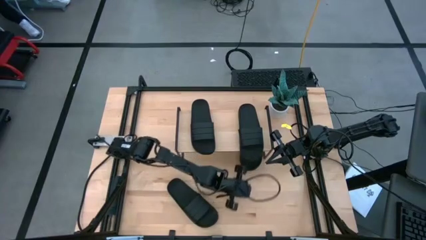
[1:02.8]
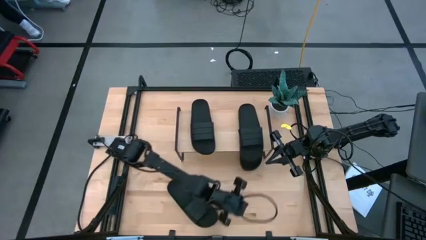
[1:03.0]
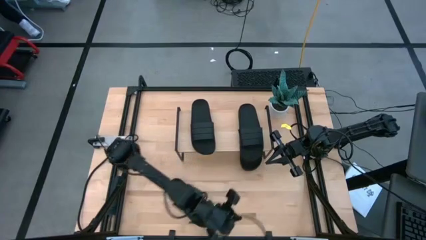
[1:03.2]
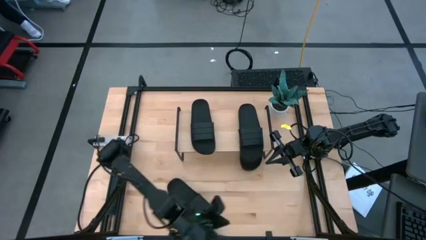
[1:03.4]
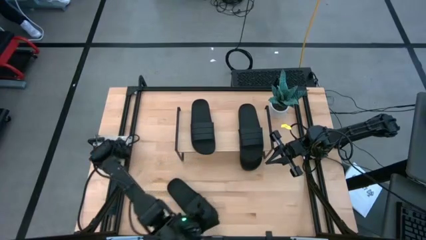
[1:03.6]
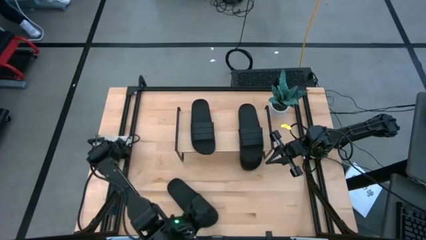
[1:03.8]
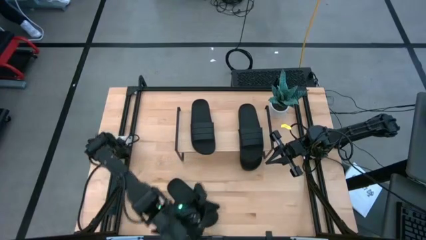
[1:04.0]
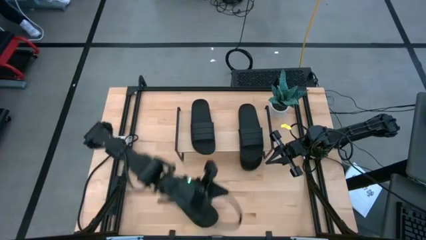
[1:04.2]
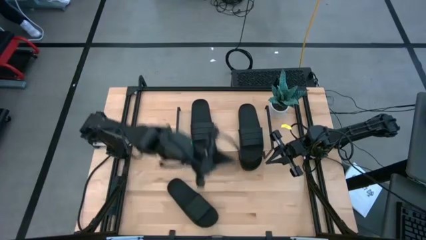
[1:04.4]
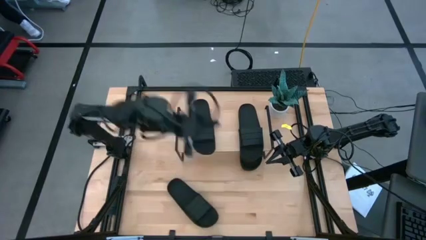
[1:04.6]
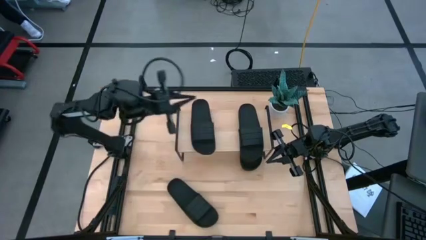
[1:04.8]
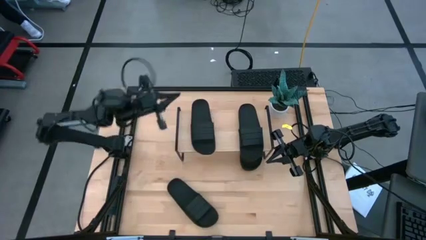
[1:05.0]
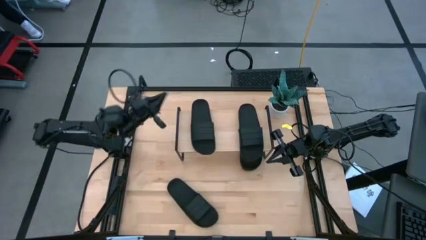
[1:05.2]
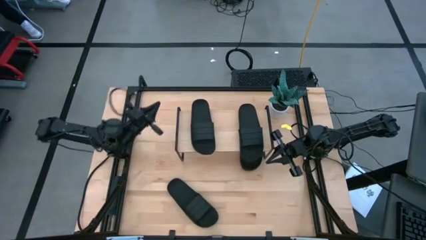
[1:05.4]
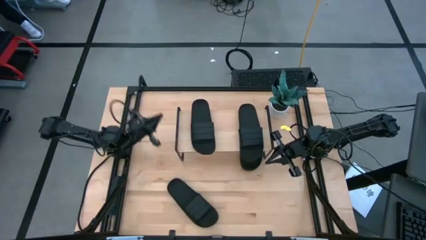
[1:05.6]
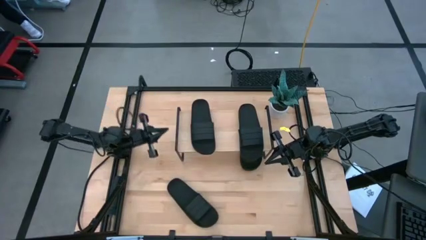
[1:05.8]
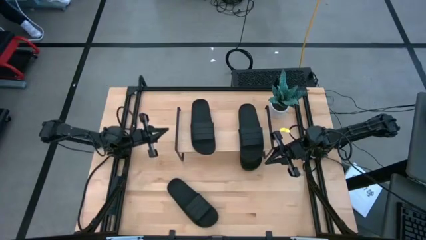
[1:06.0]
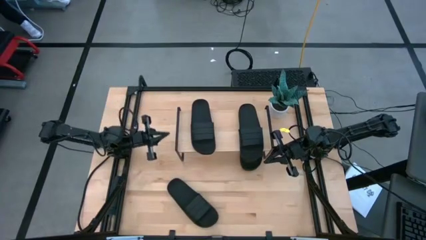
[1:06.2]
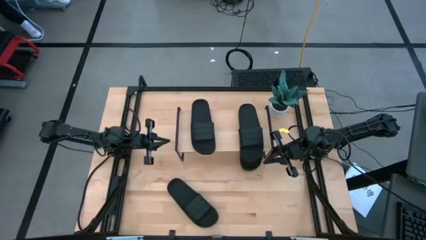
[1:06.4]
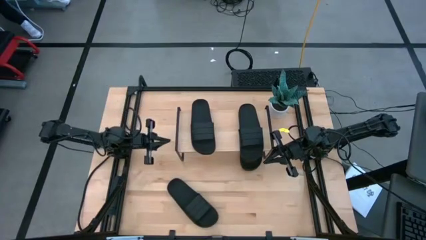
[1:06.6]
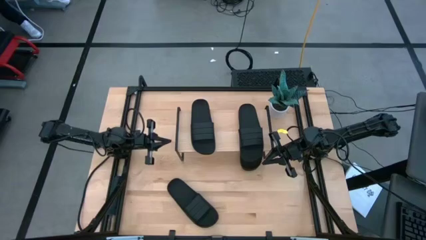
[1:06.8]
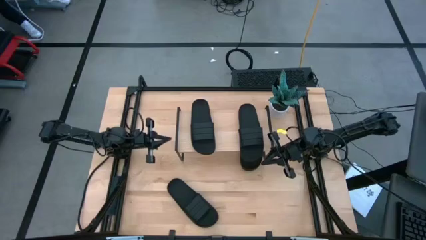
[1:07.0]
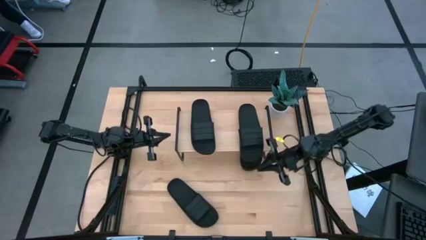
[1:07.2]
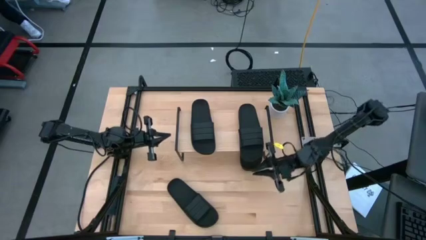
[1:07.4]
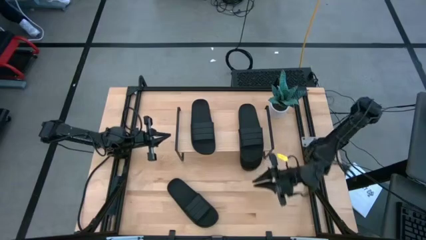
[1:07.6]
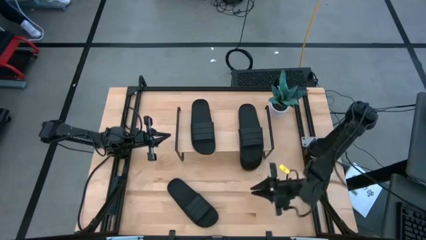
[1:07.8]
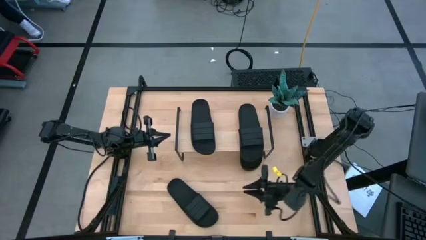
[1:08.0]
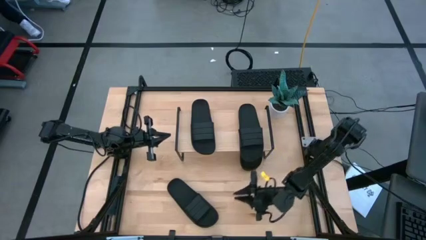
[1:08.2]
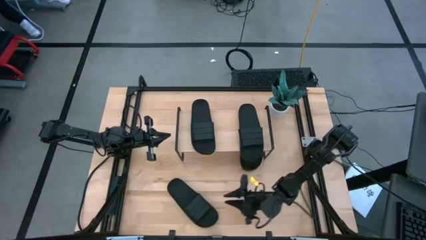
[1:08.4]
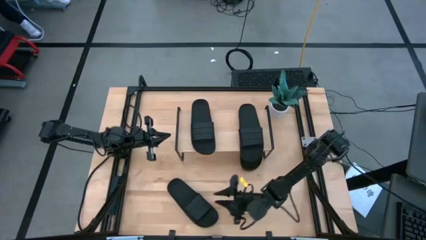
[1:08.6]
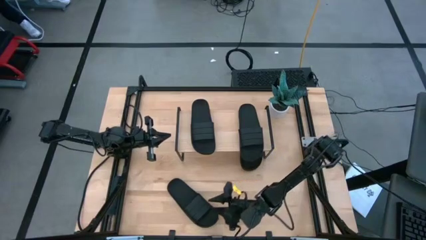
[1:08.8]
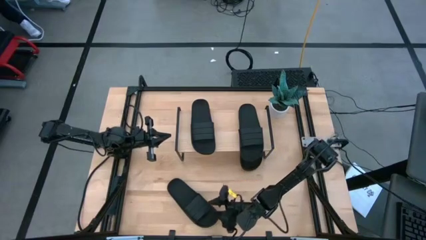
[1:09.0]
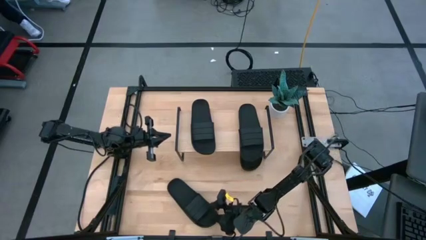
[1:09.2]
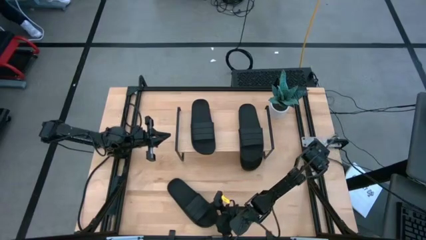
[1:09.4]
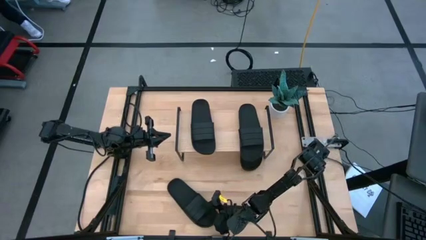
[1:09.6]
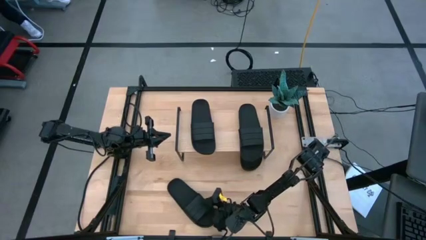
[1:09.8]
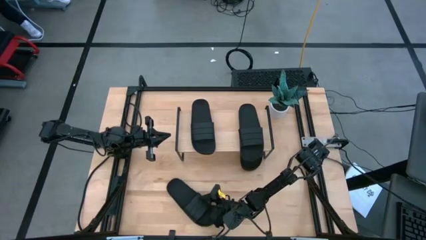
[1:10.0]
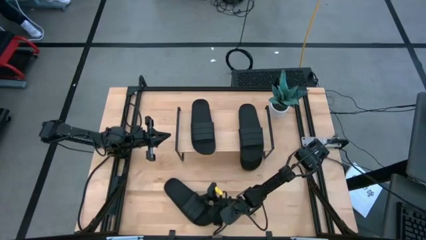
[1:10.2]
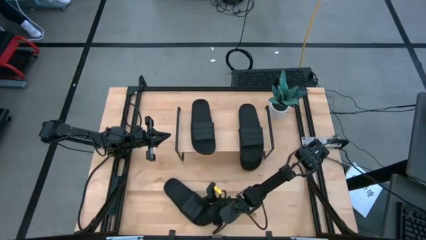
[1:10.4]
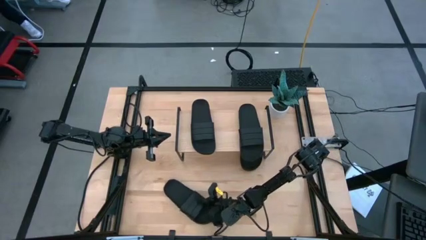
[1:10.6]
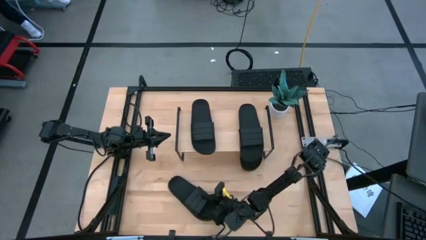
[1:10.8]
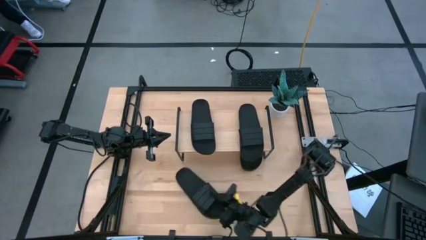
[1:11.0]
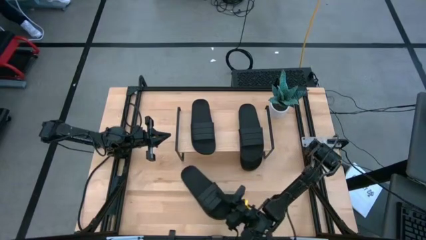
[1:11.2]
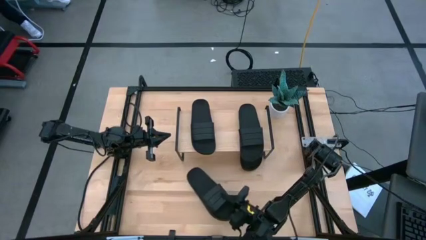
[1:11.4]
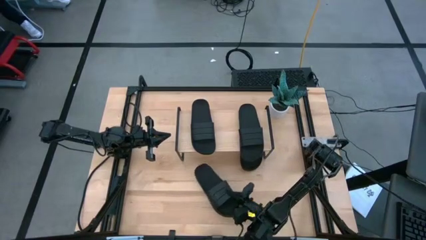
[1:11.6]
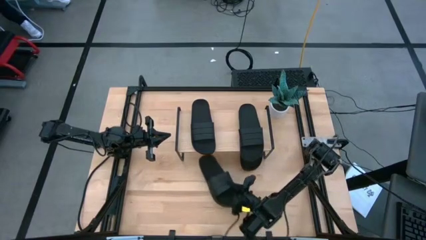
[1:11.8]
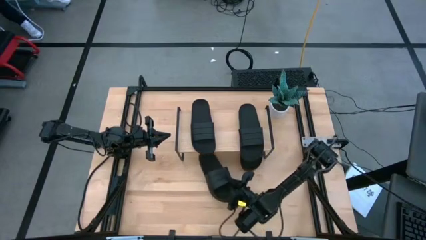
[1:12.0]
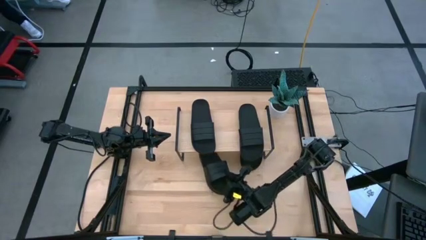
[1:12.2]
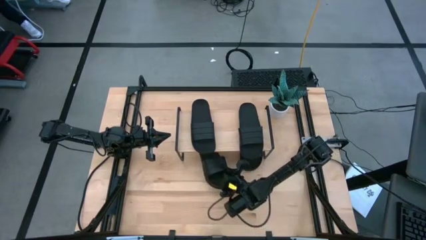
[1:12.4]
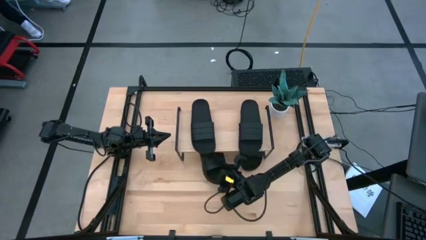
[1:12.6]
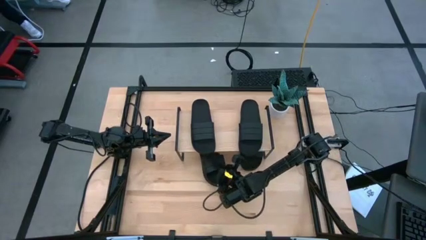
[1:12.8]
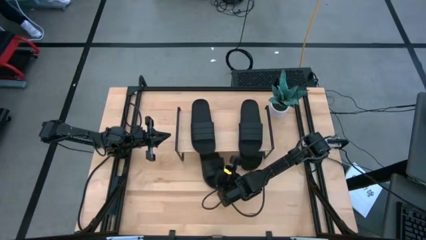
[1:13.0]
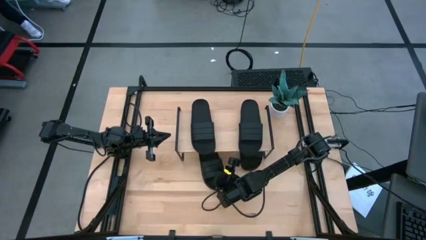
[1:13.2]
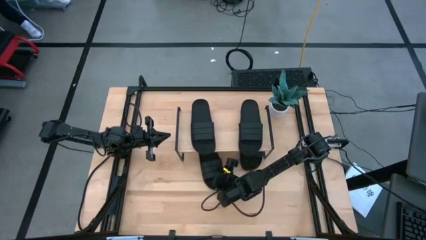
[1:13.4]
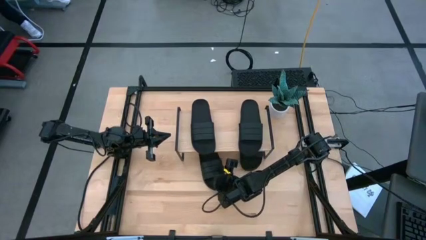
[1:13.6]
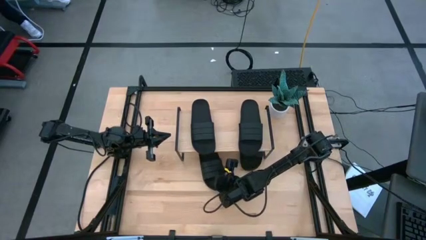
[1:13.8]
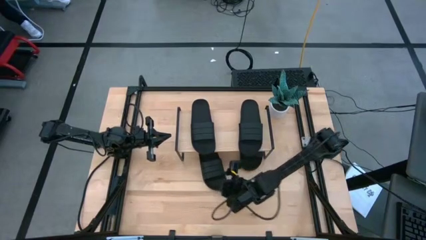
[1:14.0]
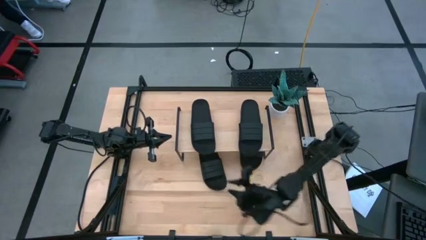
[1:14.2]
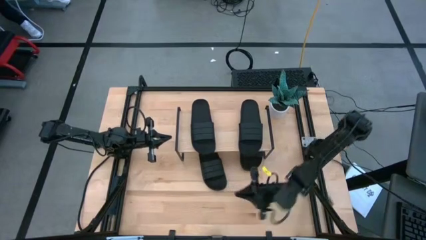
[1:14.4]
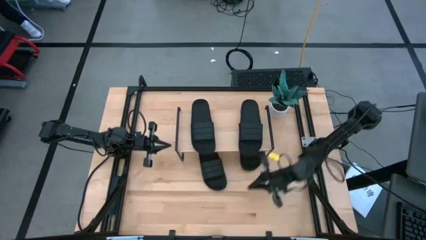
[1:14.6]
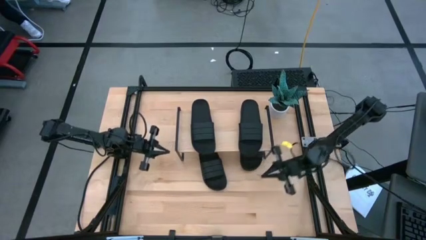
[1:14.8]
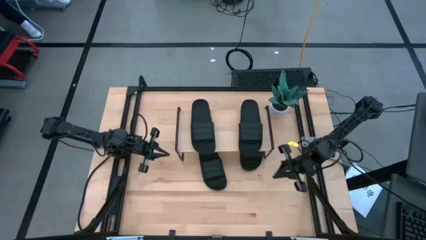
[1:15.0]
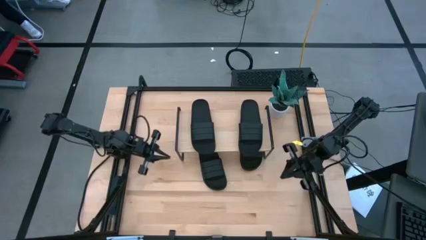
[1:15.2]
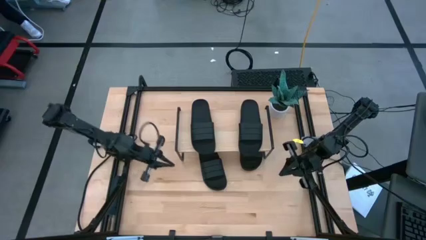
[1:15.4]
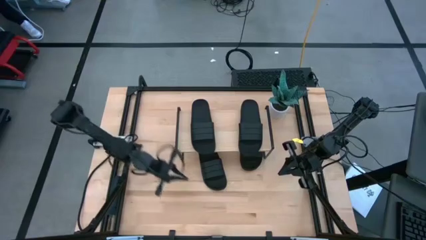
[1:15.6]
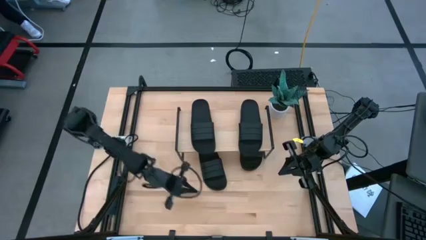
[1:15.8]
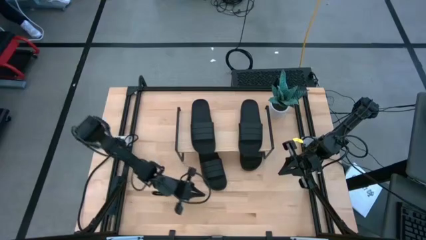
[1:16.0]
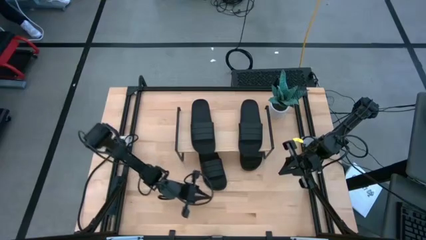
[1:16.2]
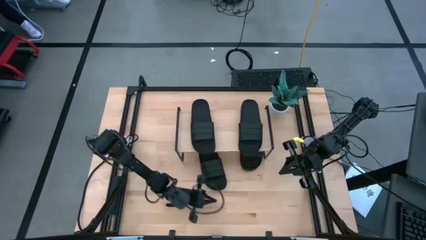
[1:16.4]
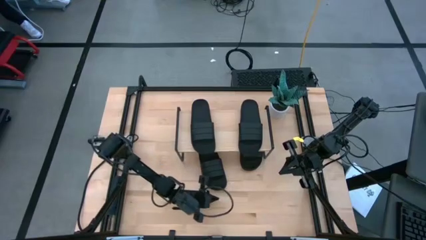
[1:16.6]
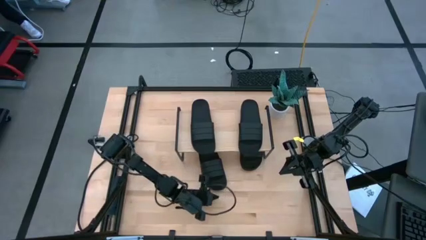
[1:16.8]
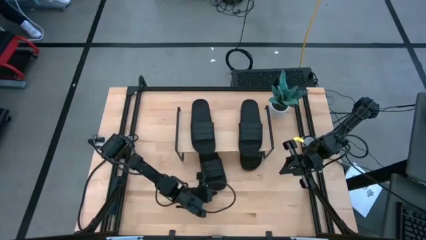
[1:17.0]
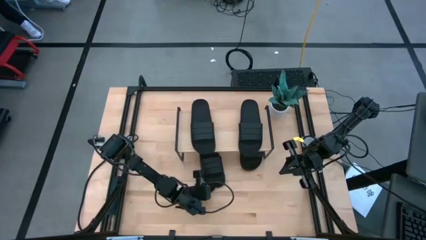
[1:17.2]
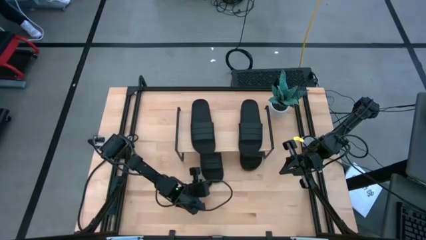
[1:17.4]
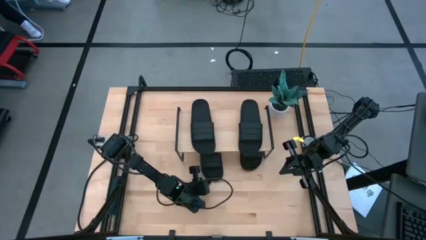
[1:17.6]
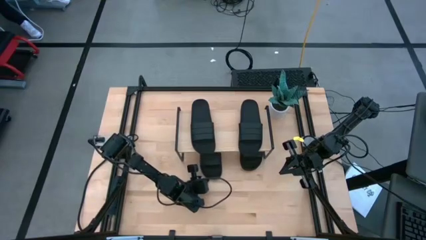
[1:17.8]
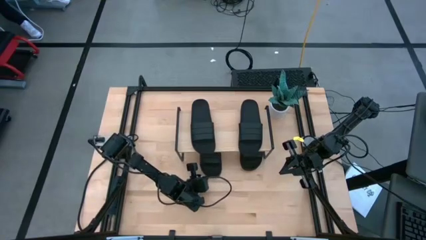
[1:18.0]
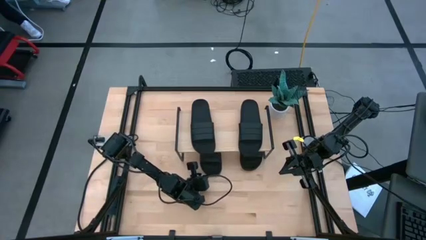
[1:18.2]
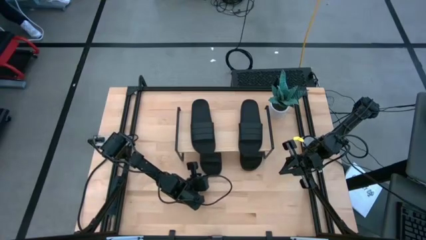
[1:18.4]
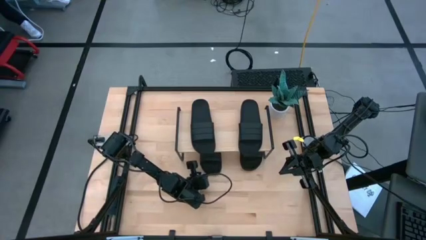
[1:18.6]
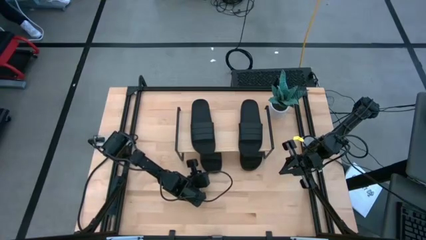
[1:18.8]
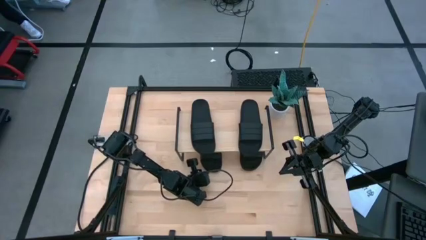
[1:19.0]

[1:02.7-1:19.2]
Task: Pick and place slides into the shelf
Put the black slide under the shelf
